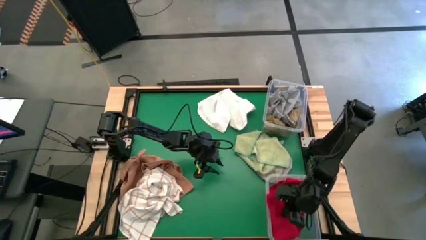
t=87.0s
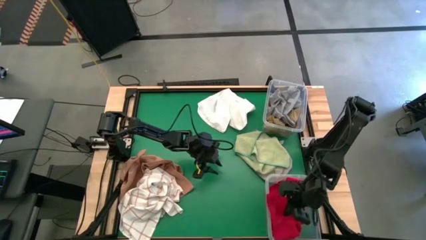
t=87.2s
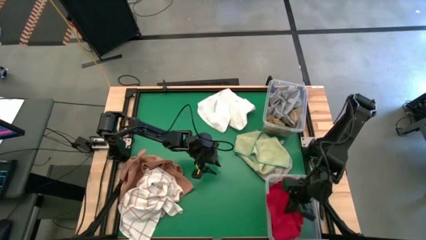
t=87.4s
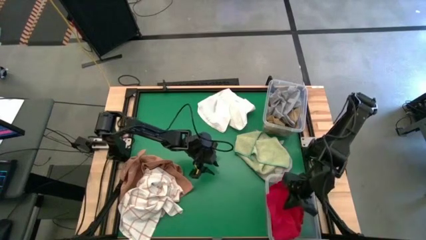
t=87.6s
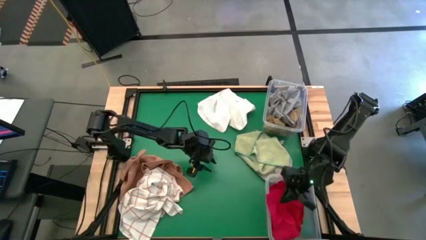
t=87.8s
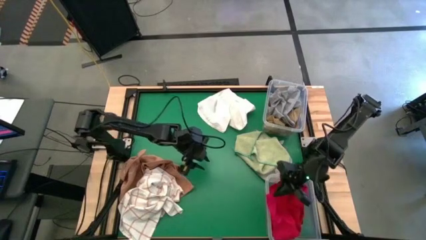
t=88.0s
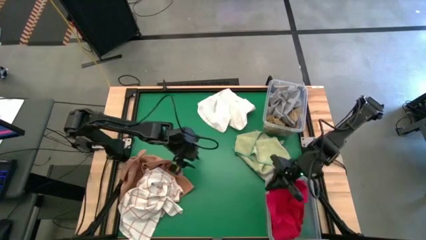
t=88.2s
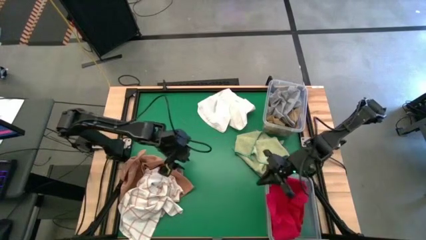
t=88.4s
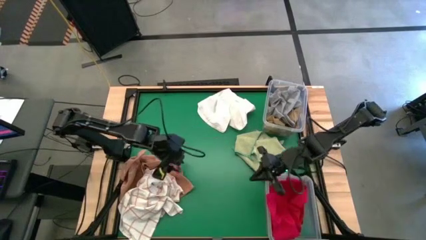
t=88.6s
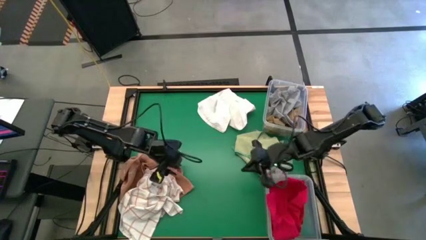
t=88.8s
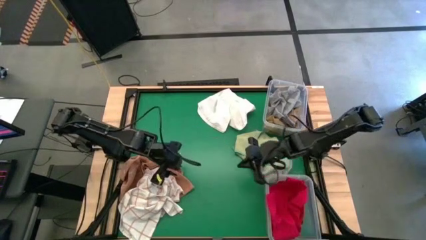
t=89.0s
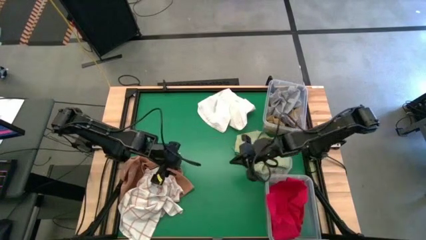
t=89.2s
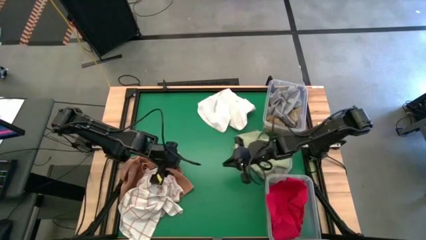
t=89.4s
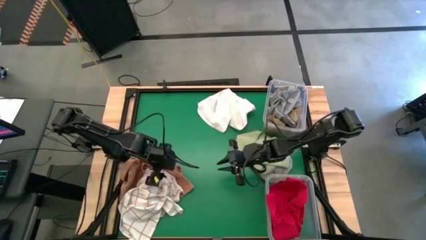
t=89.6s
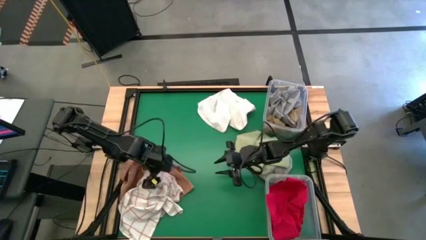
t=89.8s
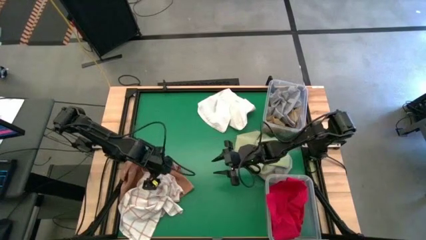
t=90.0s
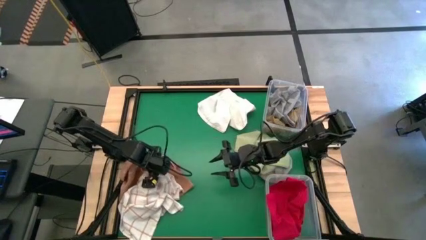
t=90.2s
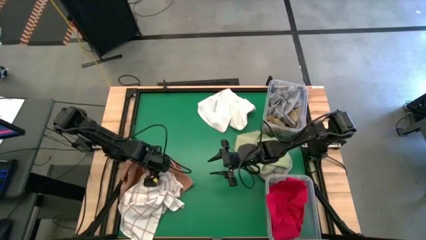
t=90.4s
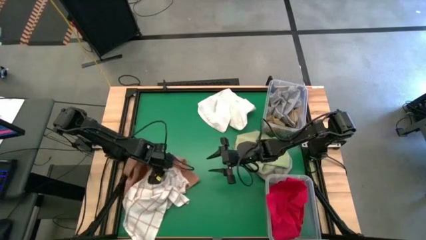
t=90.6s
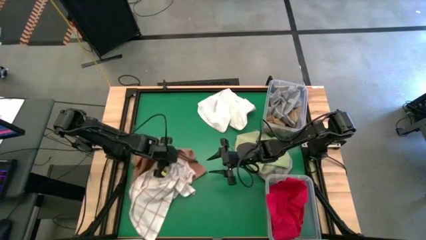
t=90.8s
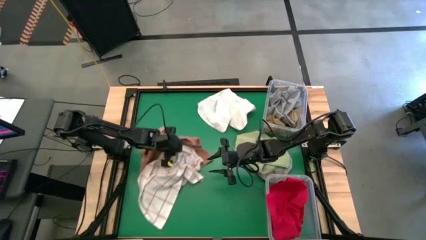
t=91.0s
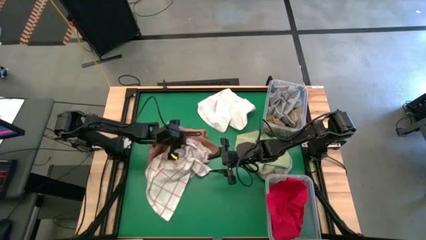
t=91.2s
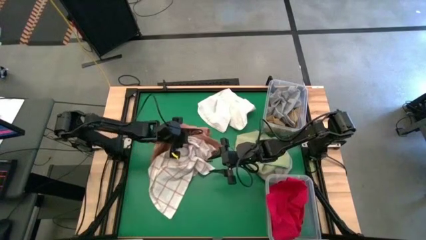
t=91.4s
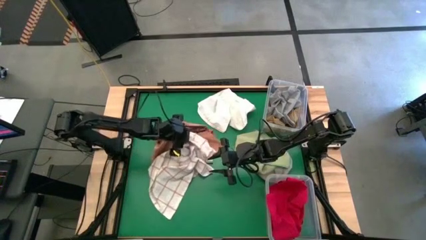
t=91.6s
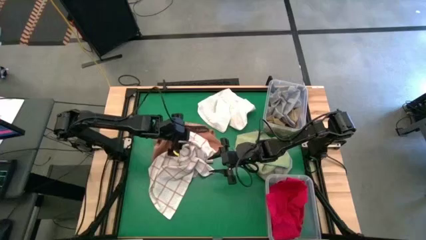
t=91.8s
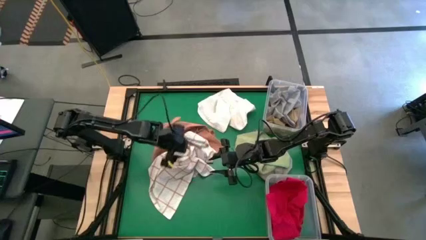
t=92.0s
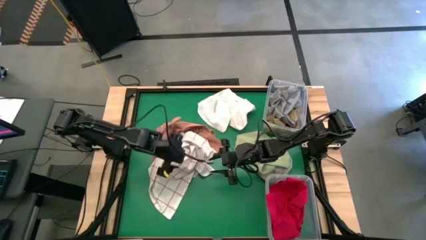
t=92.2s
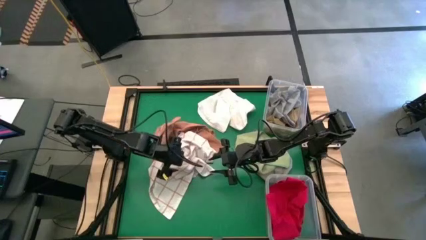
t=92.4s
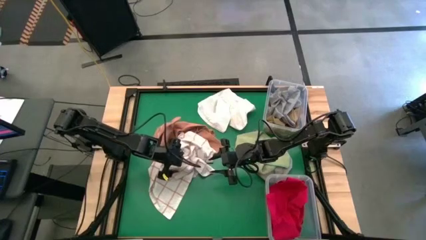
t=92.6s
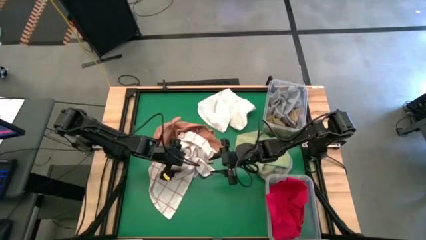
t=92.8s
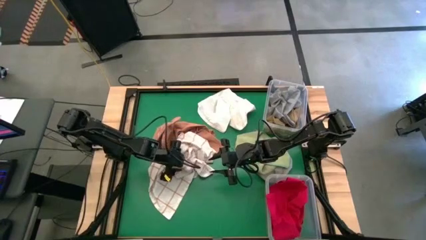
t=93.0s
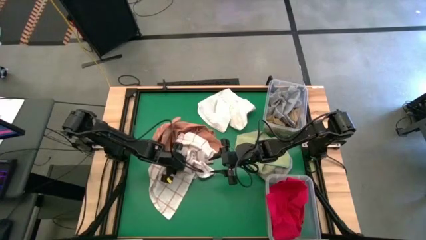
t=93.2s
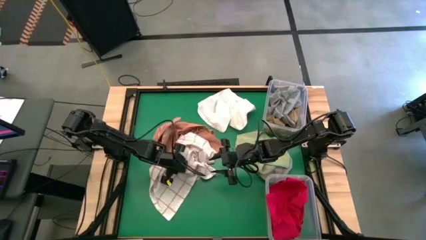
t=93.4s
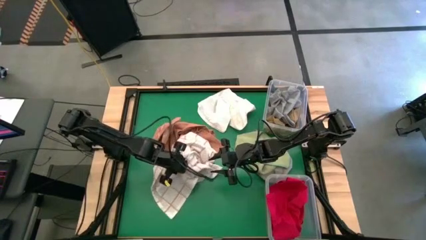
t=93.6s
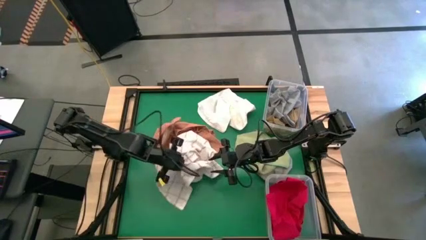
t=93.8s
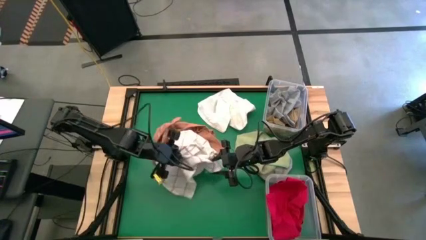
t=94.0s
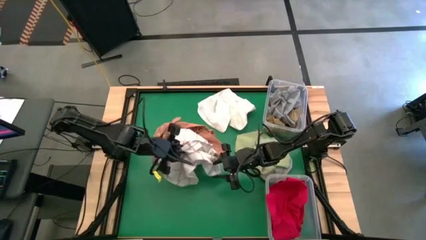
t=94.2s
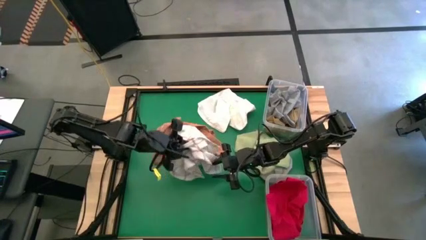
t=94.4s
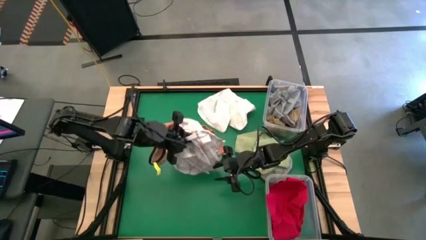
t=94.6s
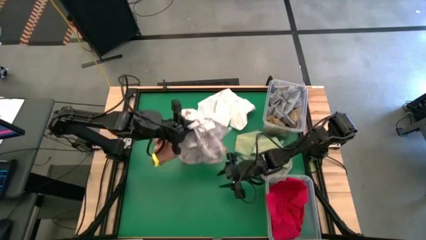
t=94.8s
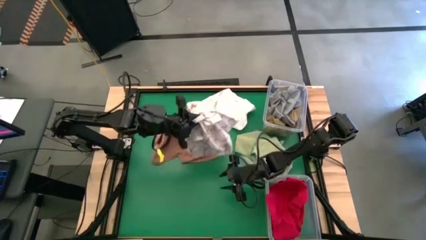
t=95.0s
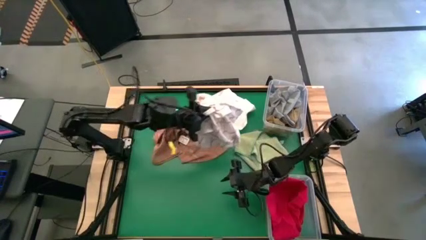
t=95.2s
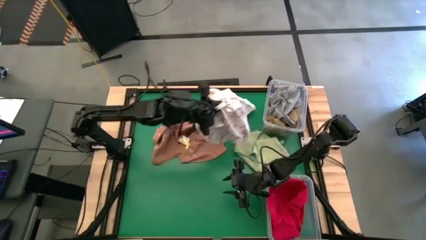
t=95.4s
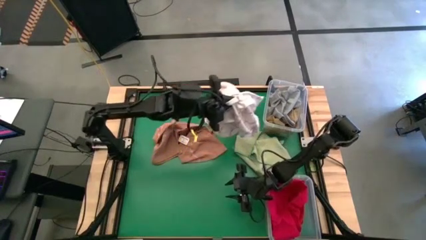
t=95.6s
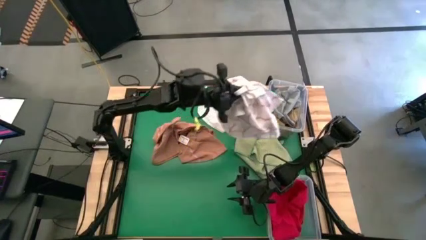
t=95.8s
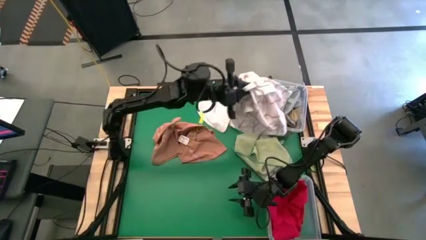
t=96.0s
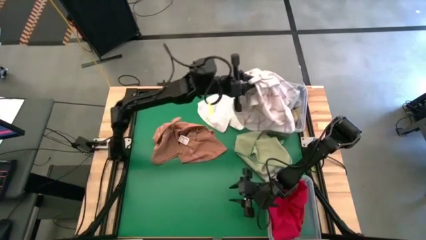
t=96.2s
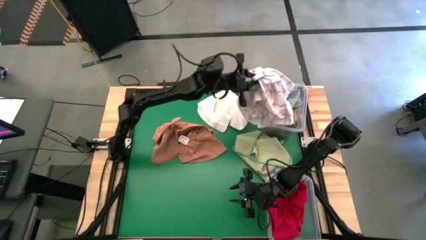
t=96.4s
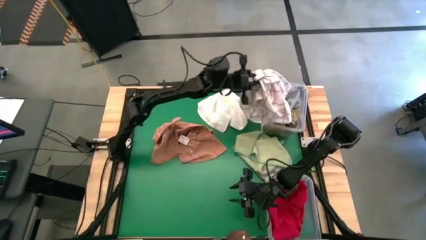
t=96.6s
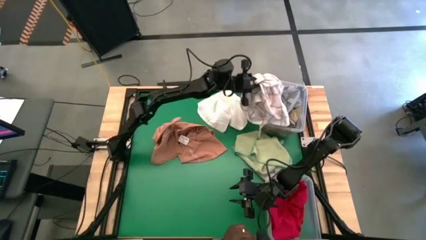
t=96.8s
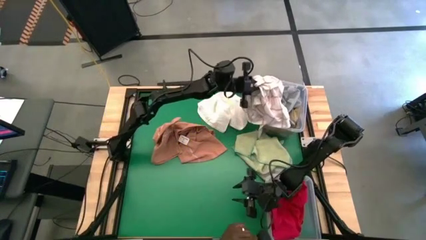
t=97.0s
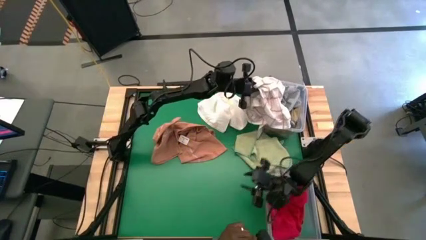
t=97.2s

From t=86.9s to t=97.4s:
Task: Sort towels by color in basket
Put the patterned white towel into the top transparent bin

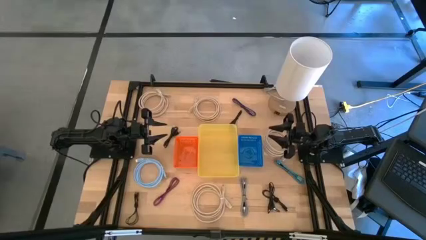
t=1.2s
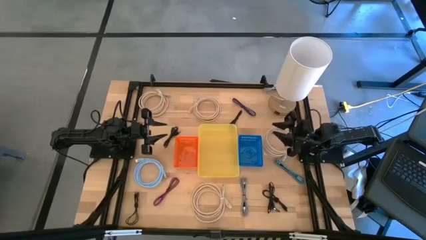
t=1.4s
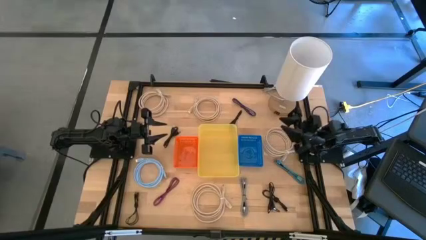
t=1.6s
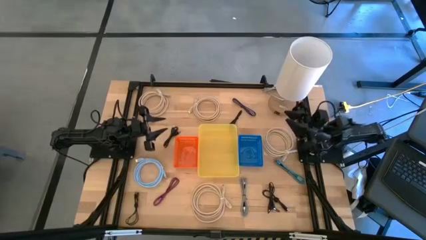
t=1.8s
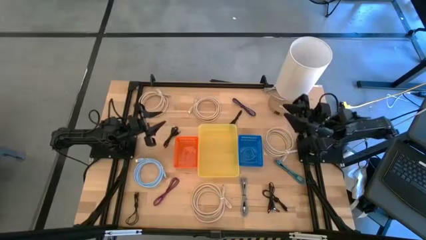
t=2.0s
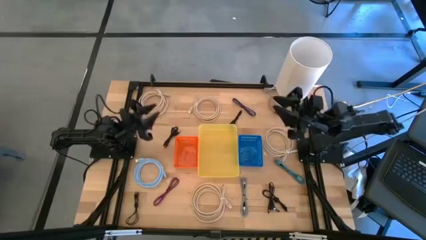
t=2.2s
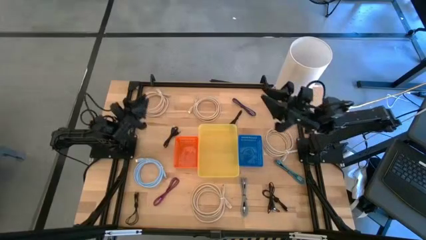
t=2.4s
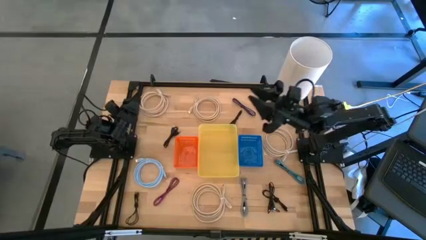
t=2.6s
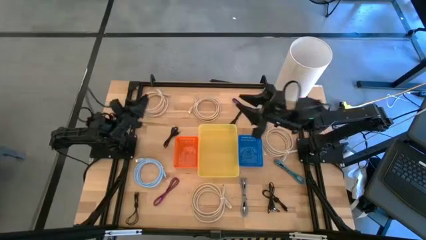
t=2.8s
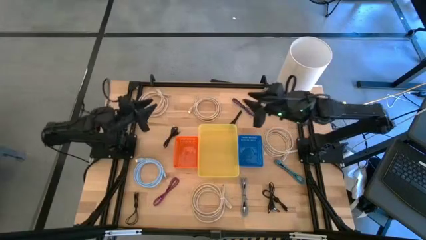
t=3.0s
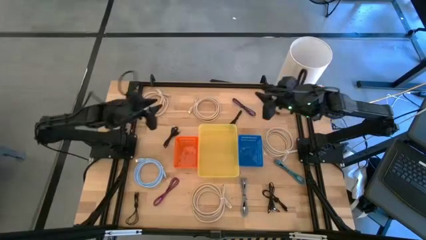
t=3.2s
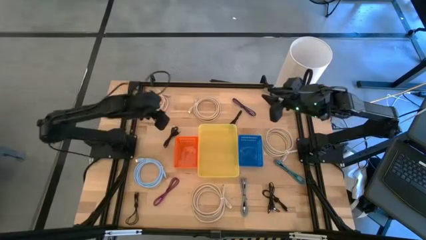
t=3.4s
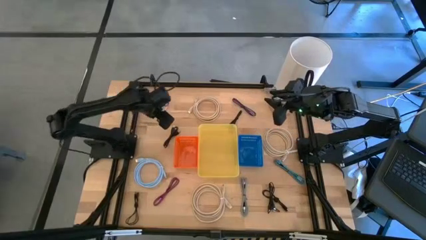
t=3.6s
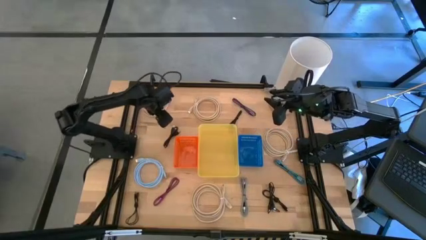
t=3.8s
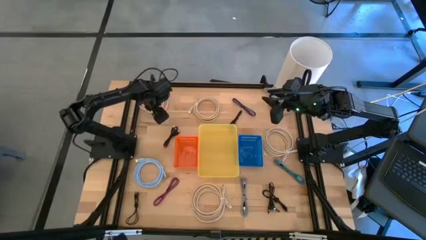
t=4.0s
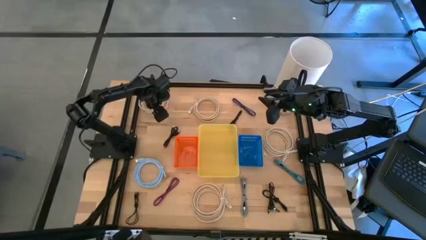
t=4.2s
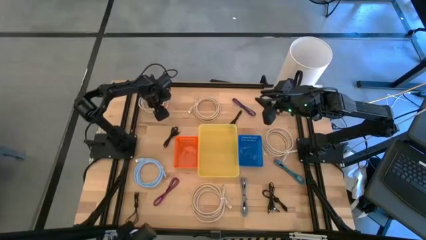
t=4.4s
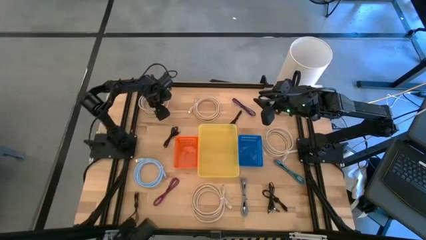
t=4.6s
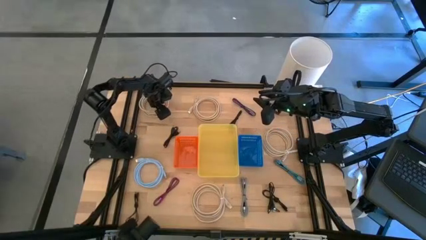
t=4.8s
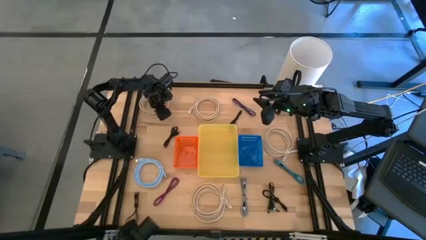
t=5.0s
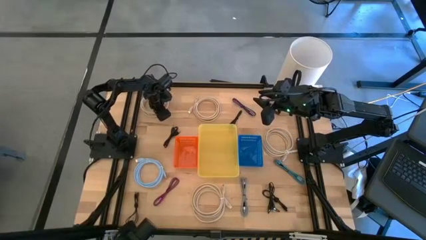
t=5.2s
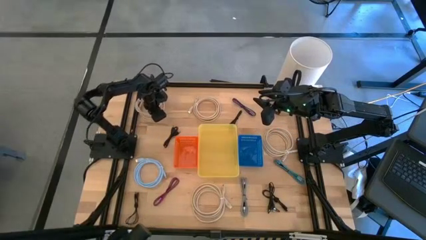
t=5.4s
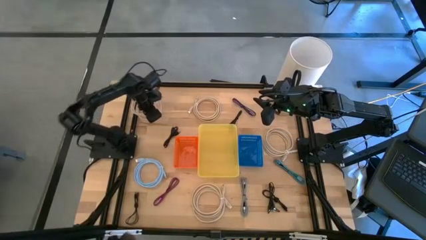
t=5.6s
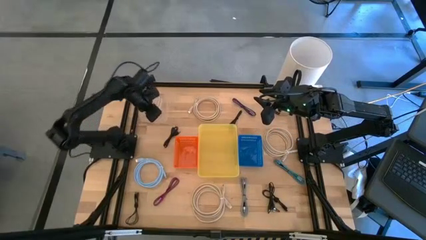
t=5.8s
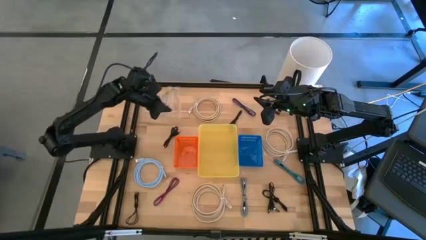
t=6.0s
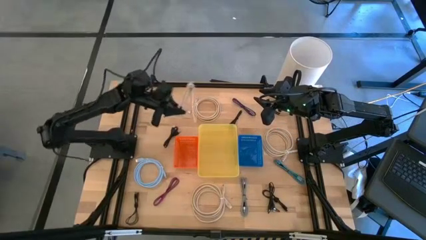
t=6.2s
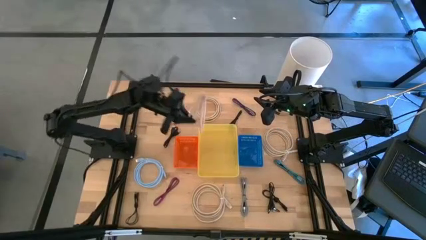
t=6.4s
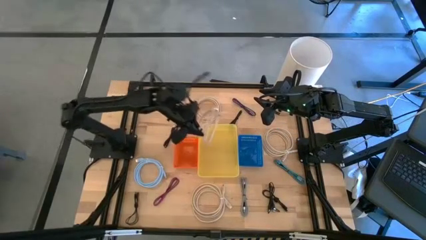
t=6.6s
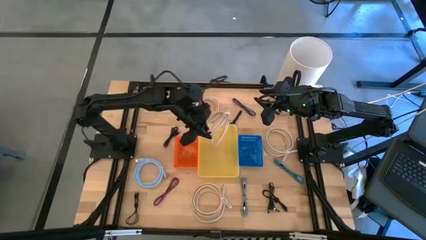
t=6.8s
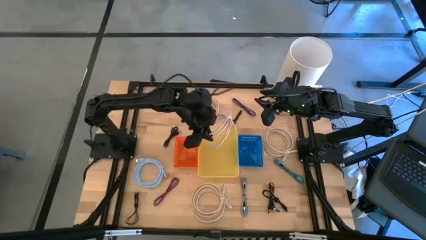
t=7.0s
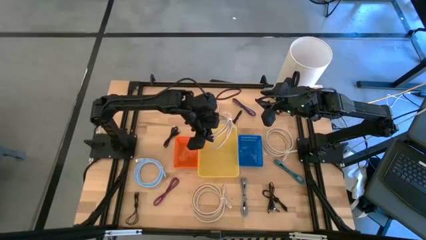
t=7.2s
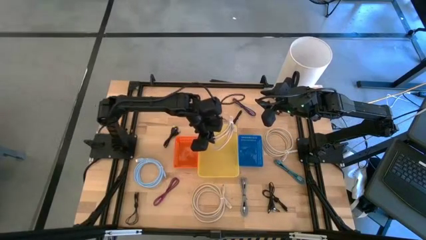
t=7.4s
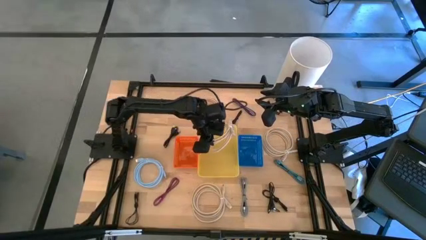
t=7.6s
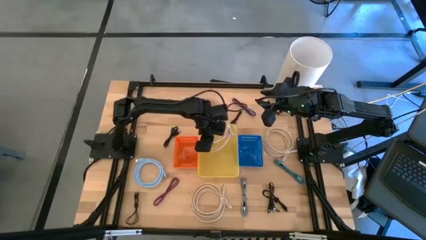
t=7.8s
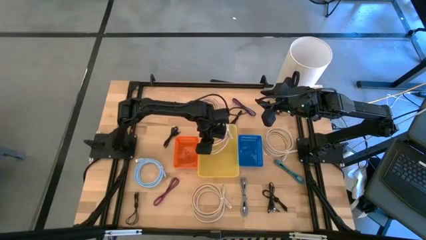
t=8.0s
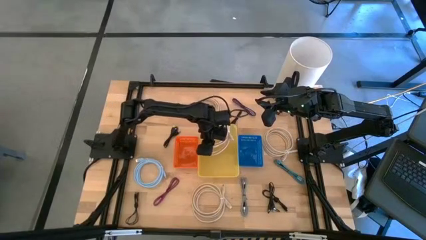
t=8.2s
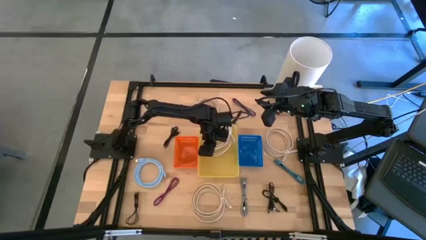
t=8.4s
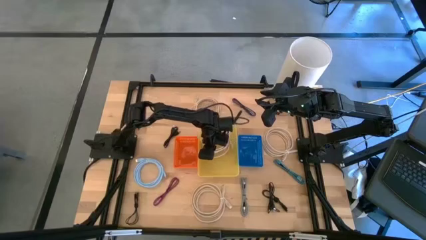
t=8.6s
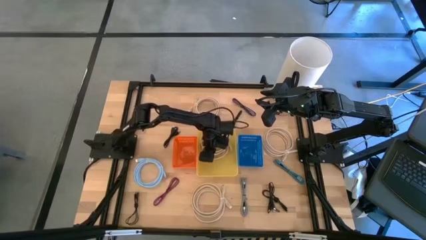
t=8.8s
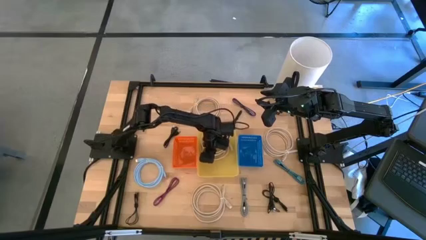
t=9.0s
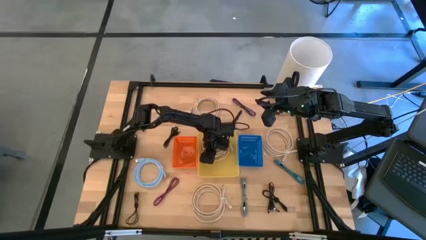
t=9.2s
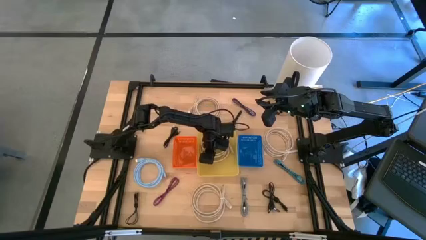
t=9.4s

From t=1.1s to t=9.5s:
Task: Pick & Place USB Port
Put the white usb cable into the yellow bin
